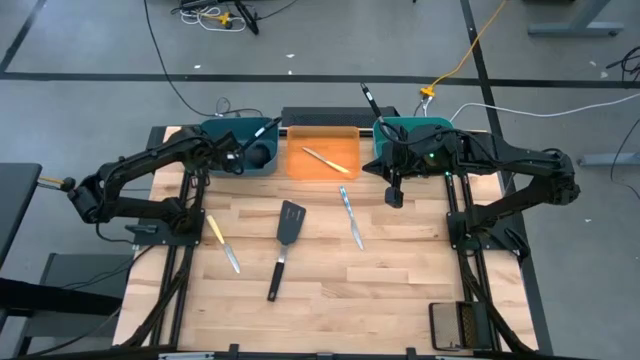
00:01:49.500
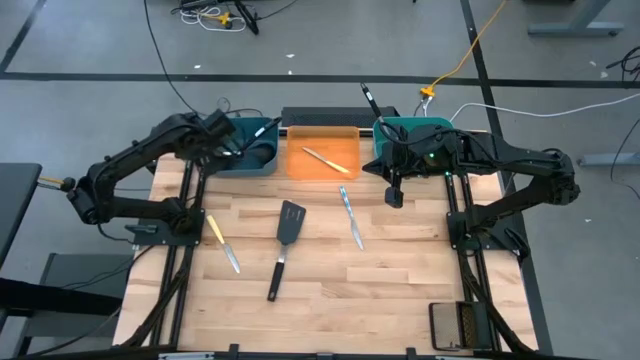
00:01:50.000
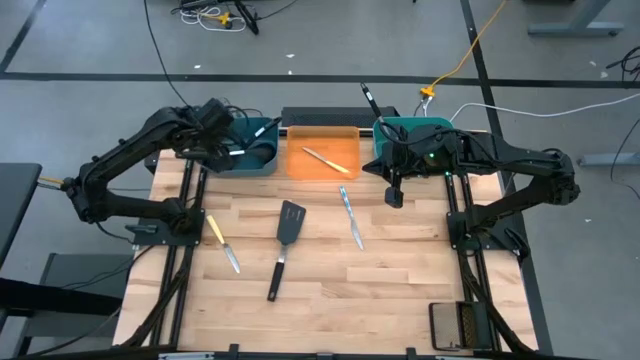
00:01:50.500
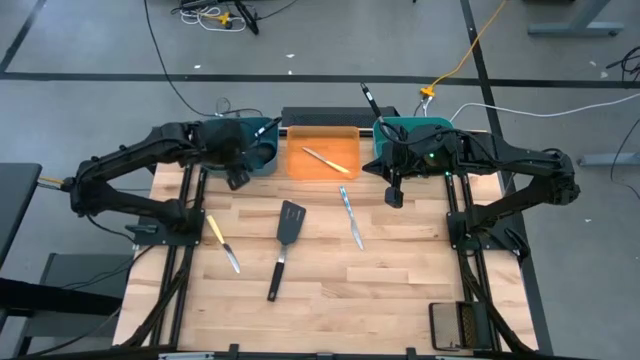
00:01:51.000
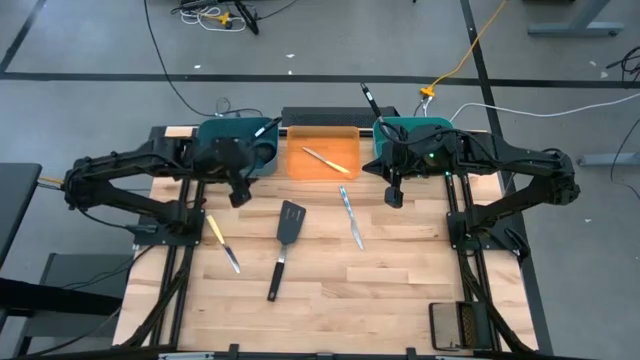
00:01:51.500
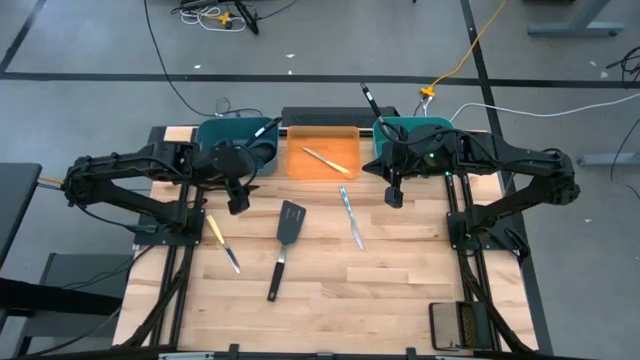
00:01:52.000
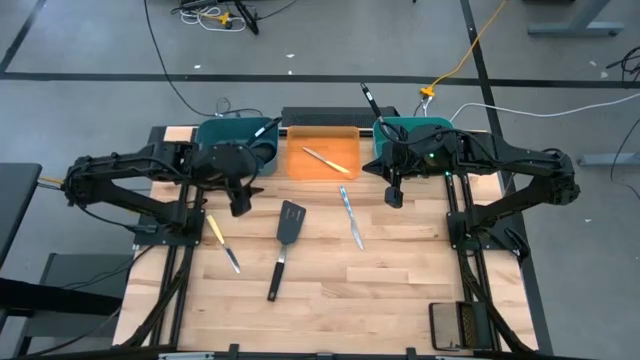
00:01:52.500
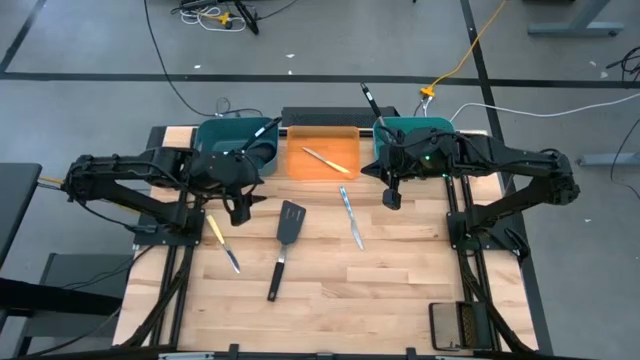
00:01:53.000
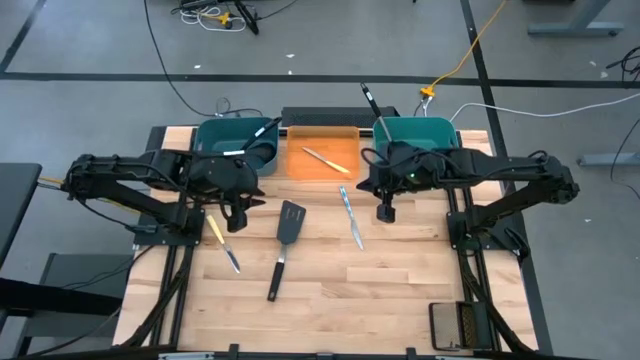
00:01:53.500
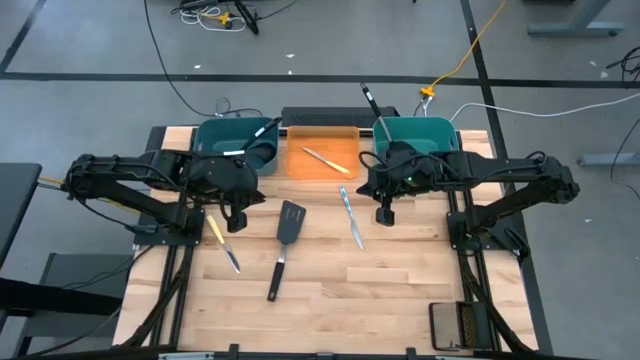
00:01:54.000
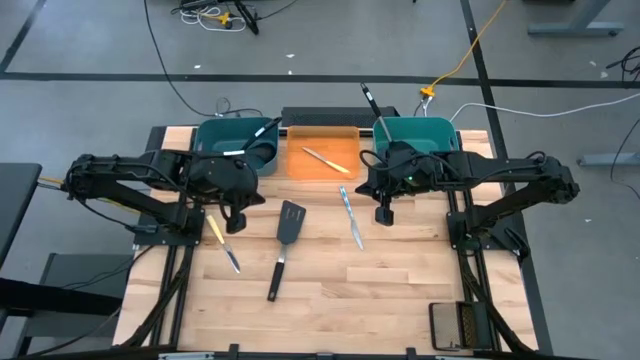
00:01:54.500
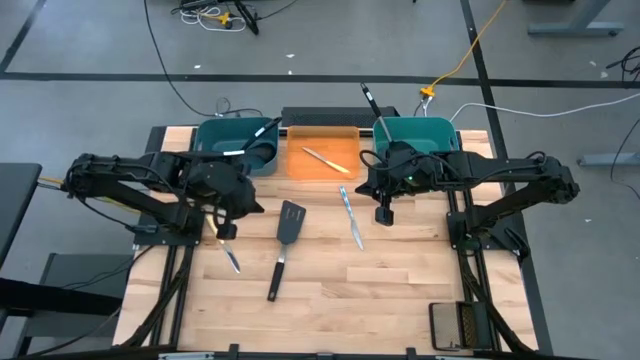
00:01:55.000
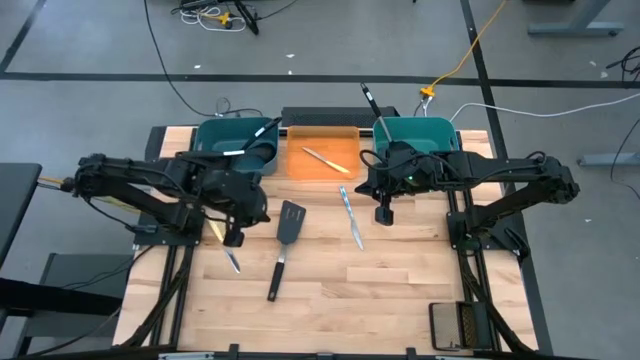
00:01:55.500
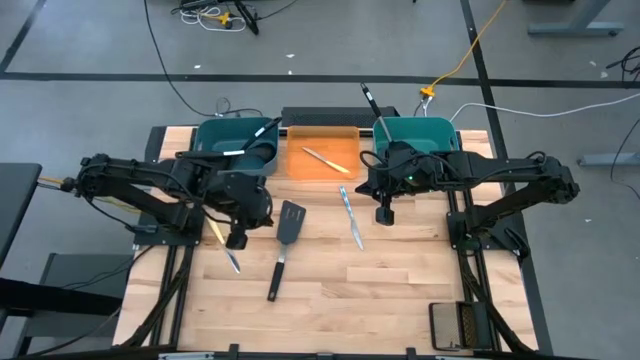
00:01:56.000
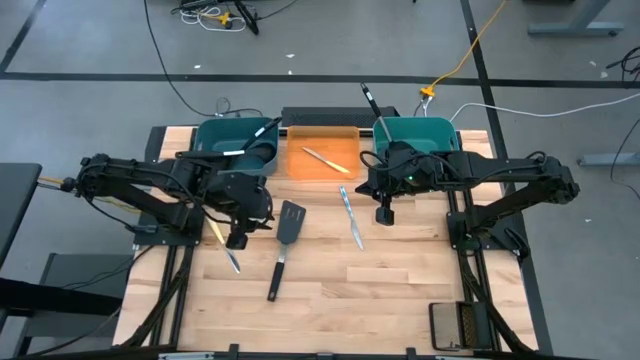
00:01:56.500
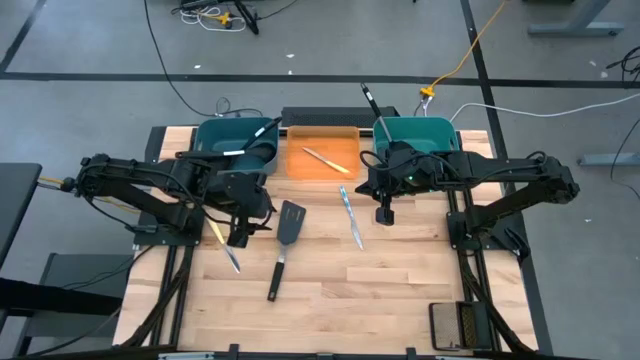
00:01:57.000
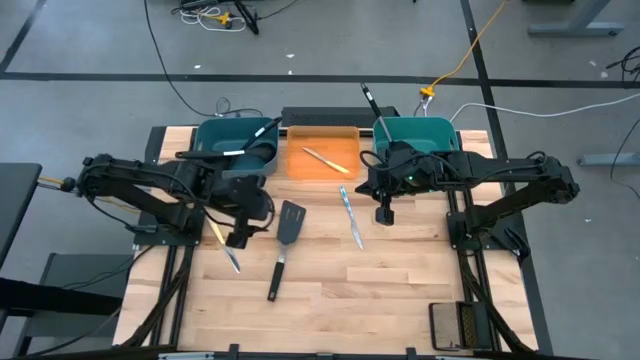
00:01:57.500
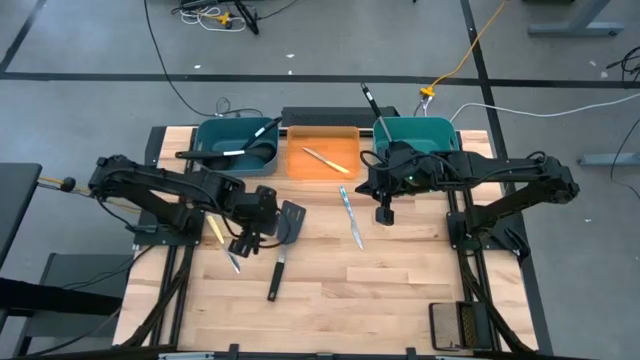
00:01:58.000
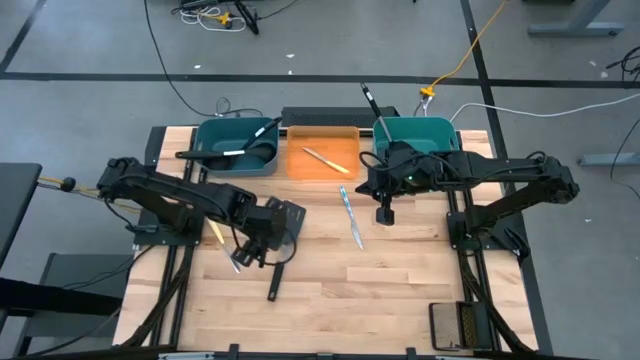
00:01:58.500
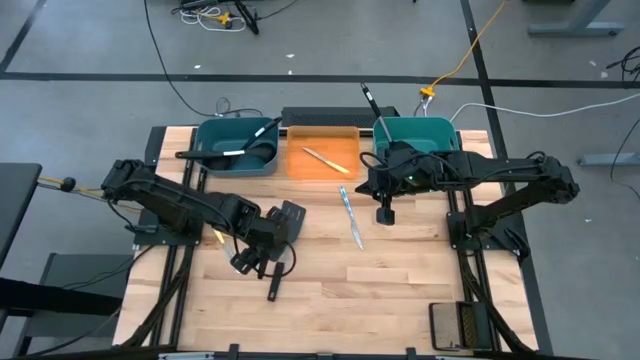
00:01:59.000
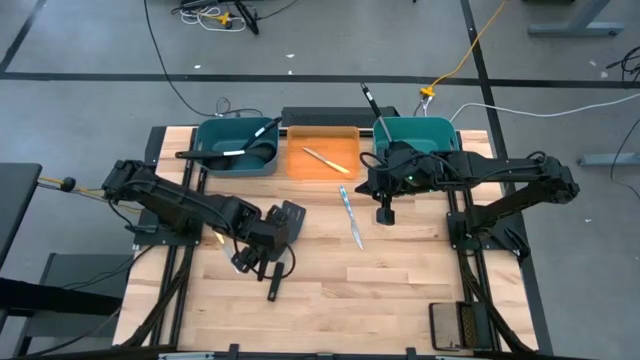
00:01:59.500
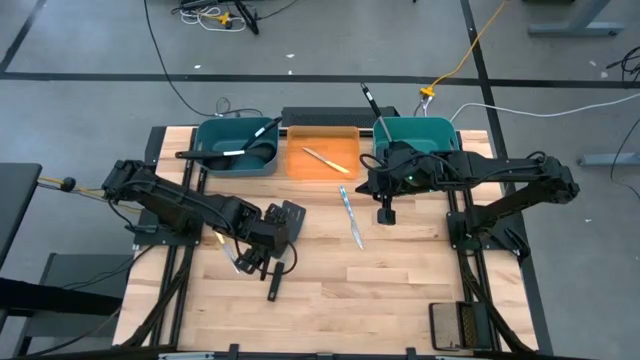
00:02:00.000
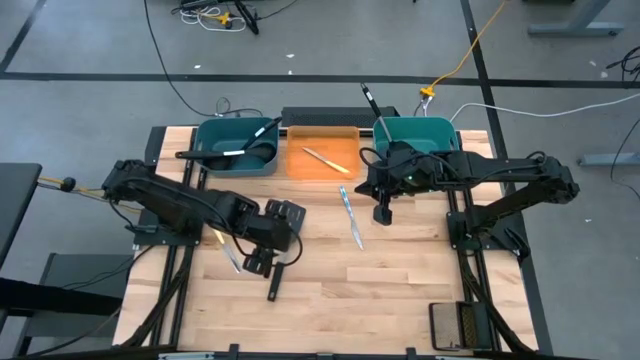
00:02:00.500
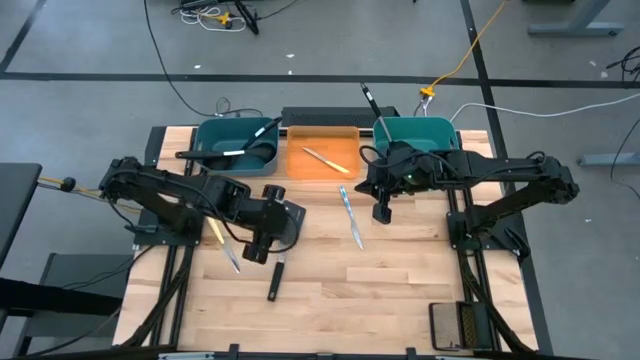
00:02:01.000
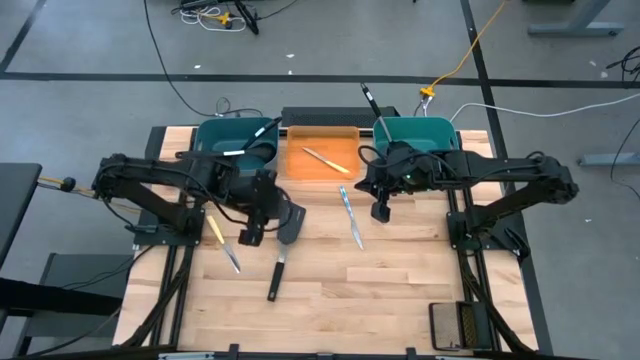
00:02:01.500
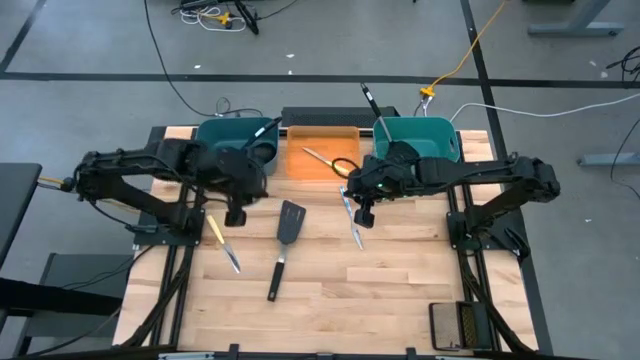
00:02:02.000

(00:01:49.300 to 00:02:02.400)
Task: Pick & Place Kitchen Items
Put the white knife into the orange bin

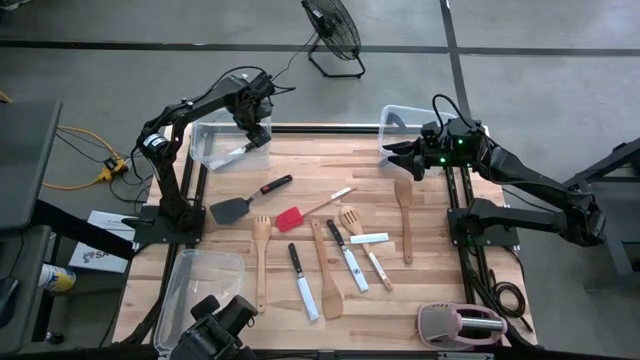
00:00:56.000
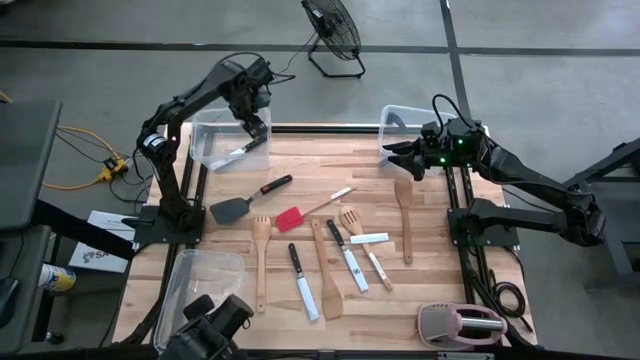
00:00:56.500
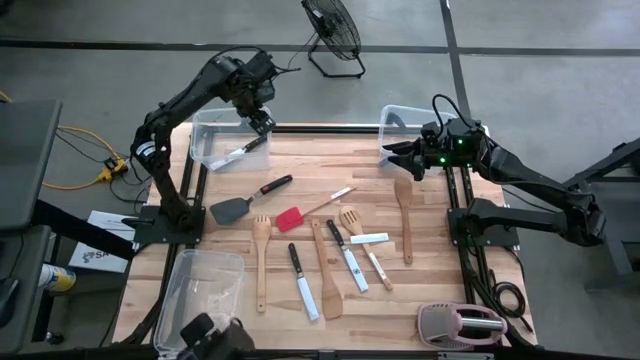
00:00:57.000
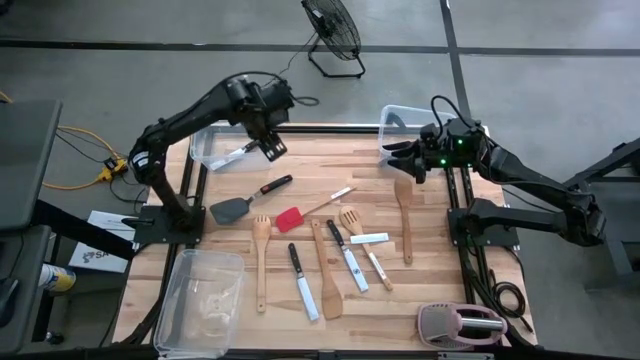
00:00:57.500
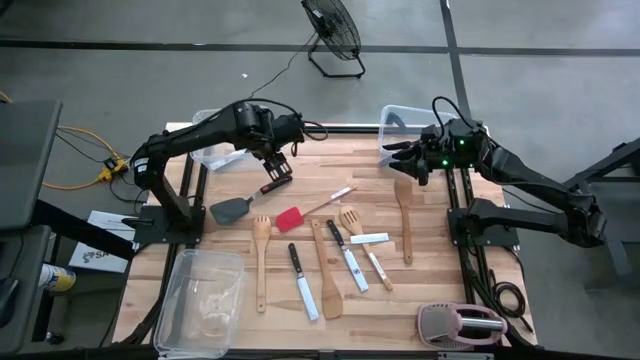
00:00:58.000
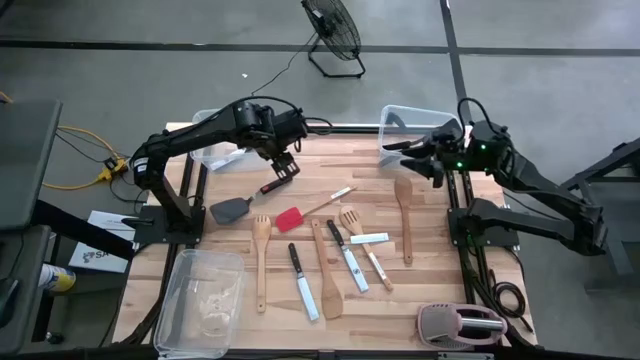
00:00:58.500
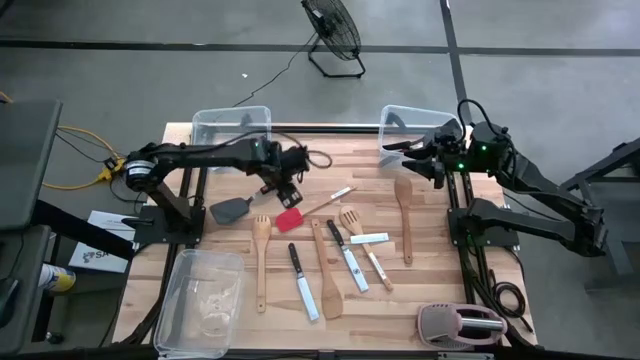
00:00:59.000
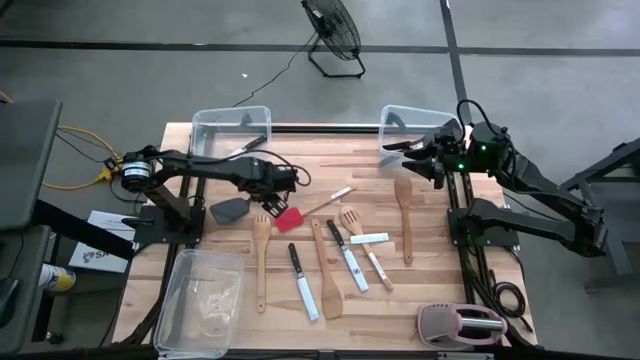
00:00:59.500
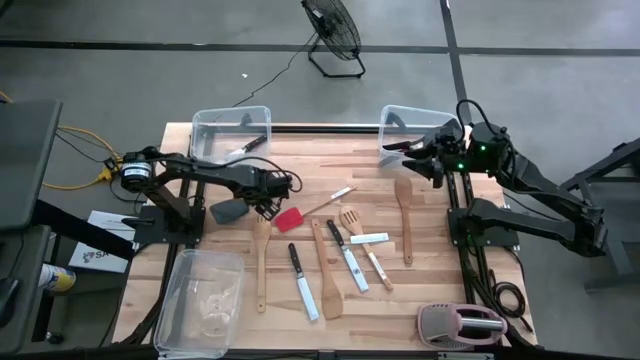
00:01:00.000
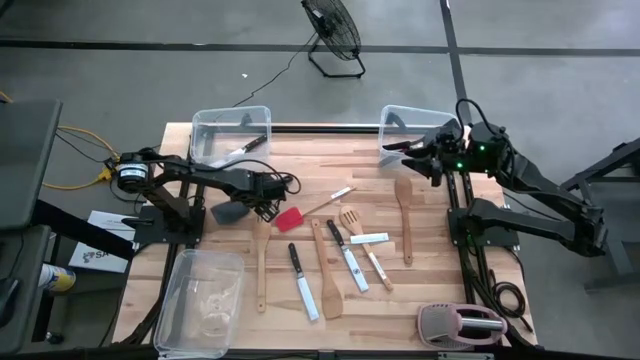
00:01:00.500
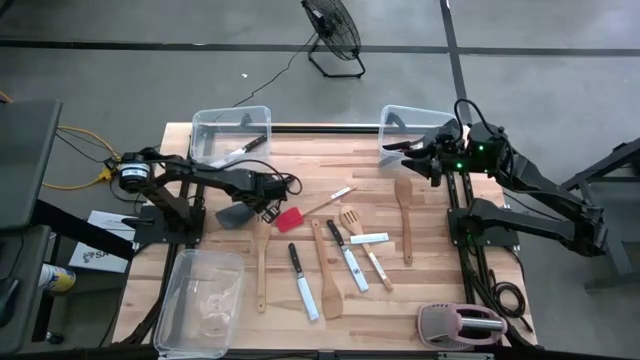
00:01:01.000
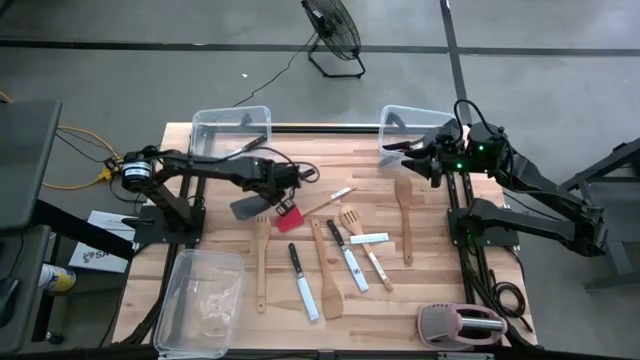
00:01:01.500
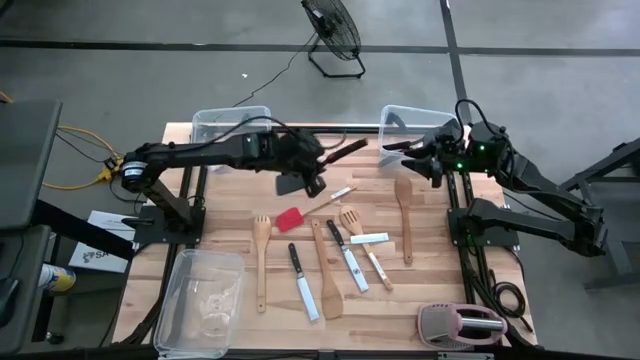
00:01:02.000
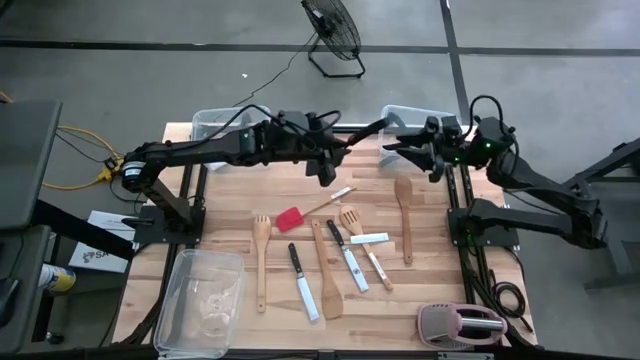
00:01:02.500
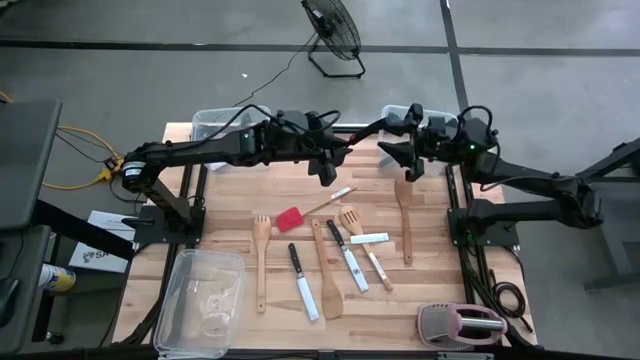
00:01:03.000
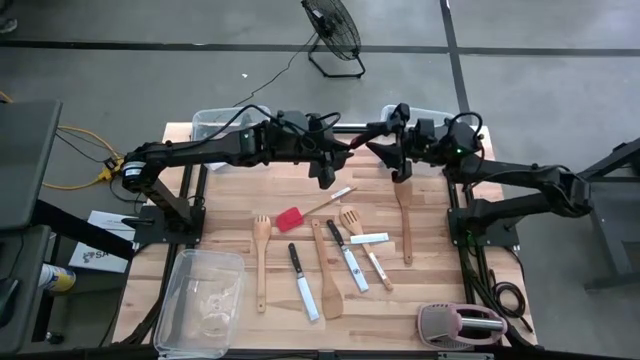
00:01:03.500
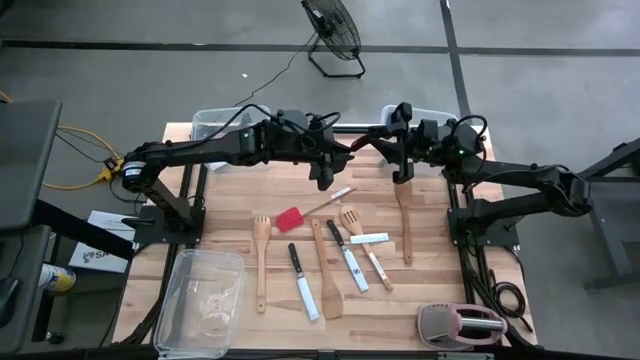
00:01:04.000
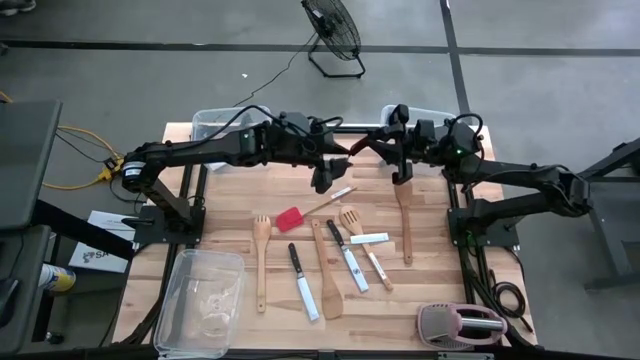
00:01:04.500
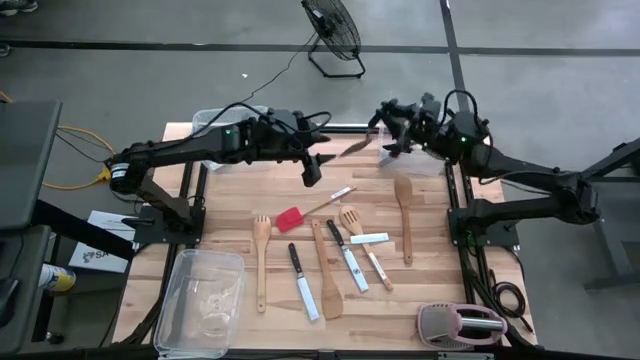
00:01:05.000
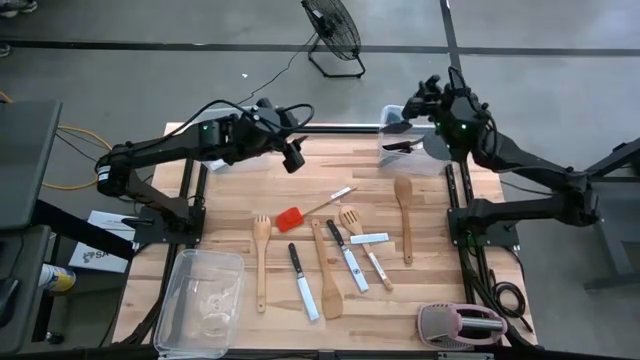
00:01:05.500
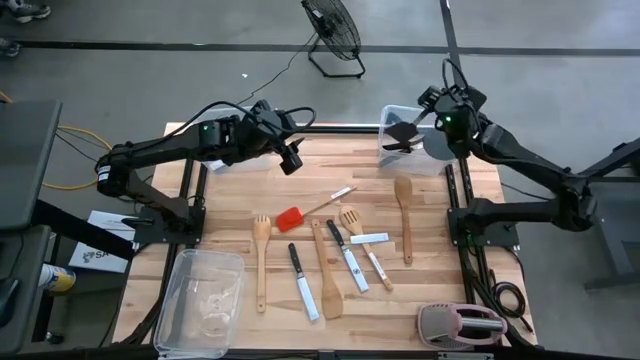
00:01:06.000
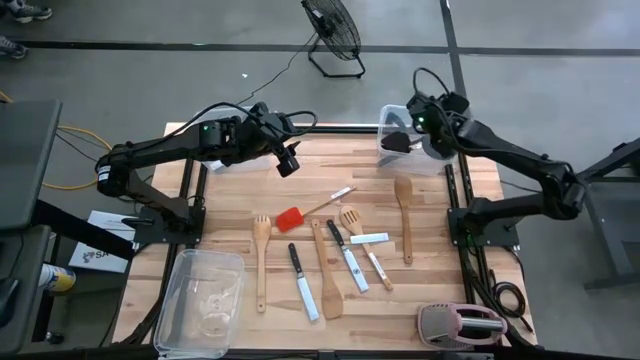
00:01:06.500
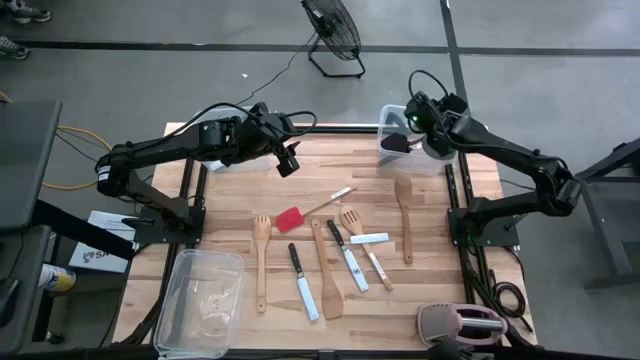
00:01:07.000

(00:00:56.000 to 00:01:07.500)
Task: Pick & Place Kitchen Items
Put the black spatula into the top right bin
